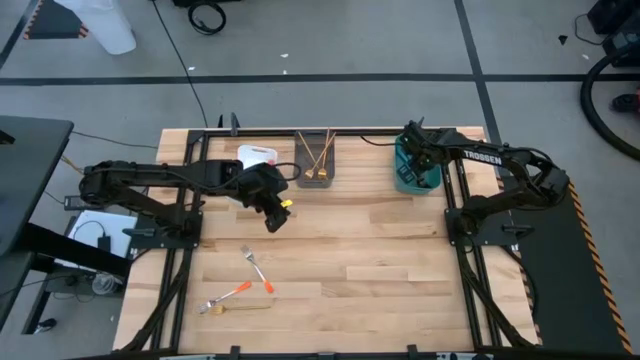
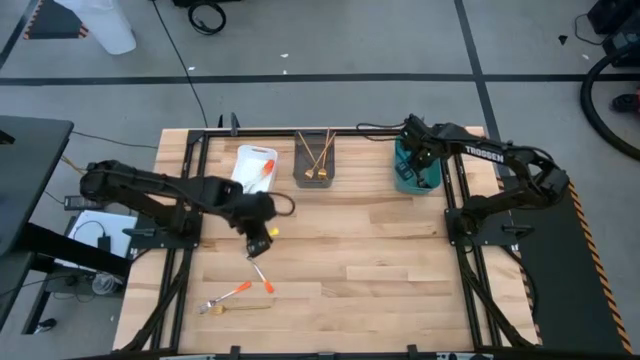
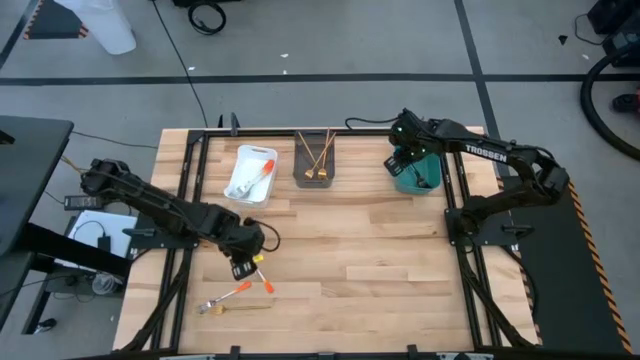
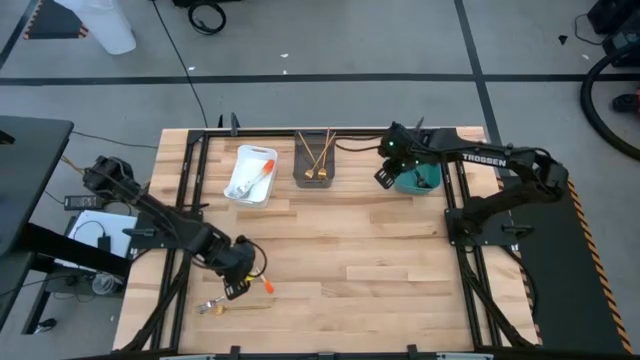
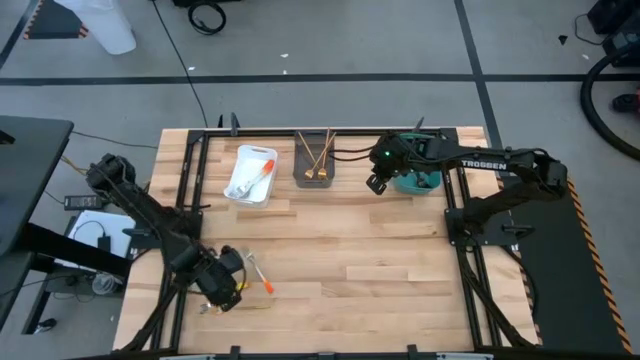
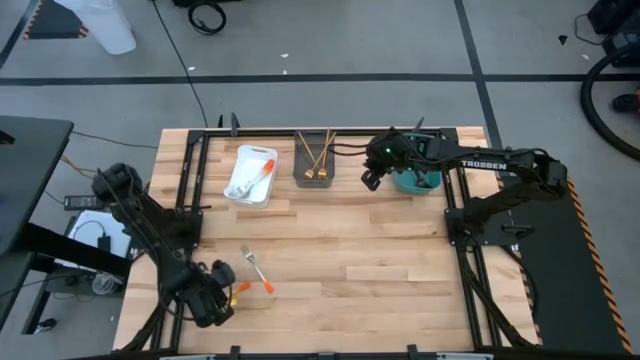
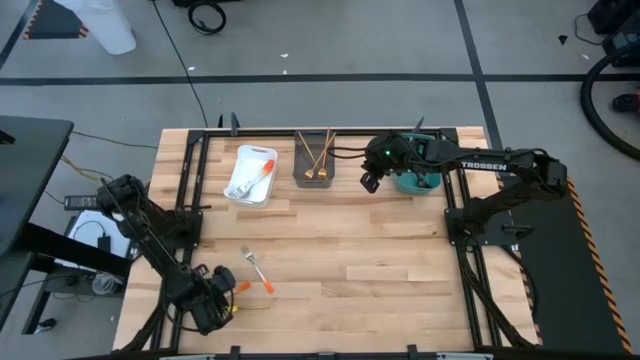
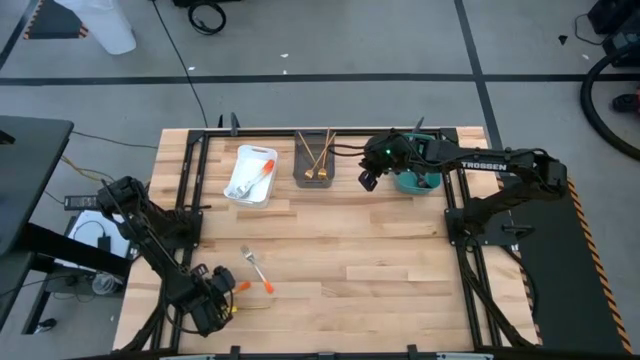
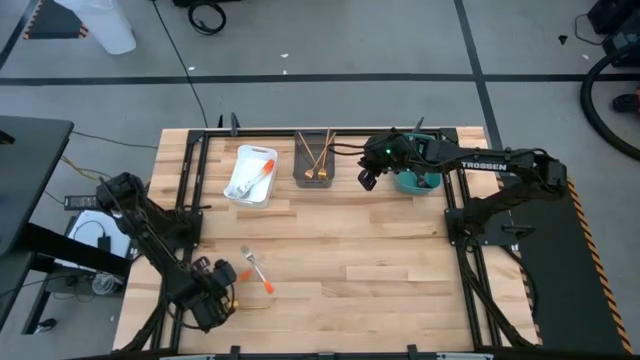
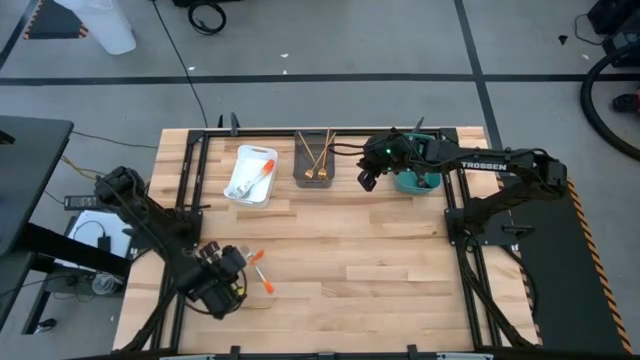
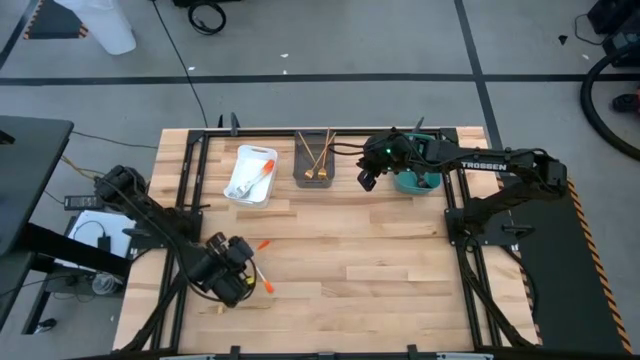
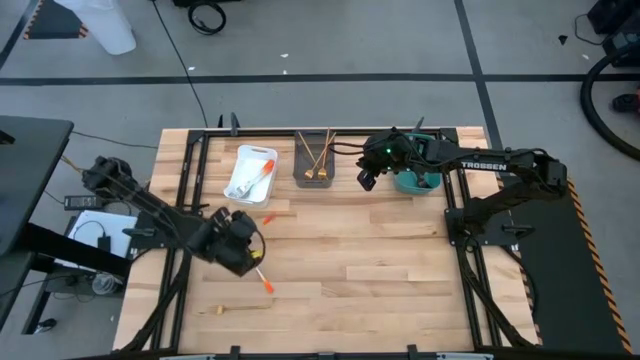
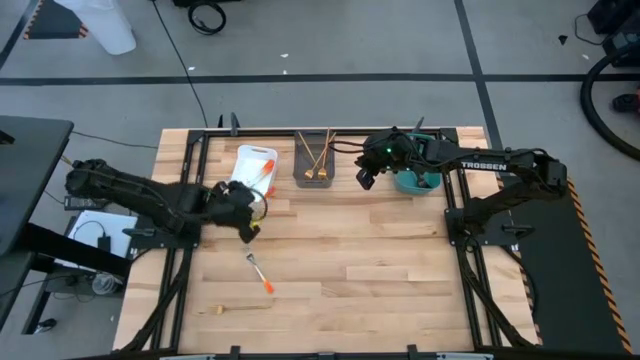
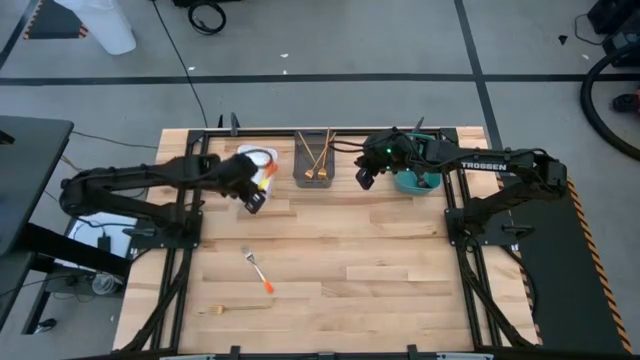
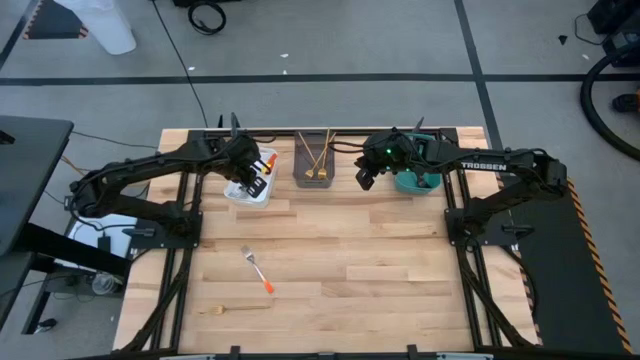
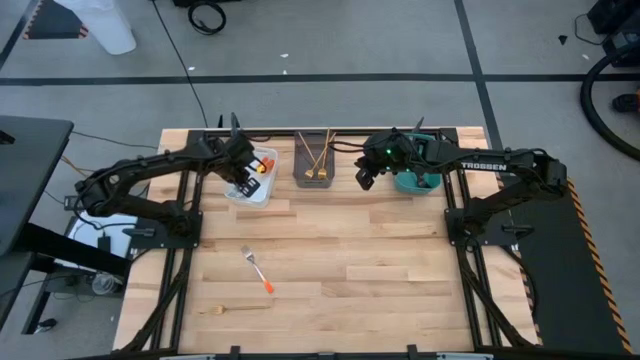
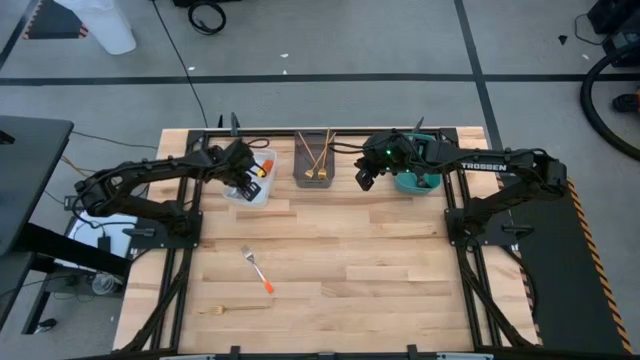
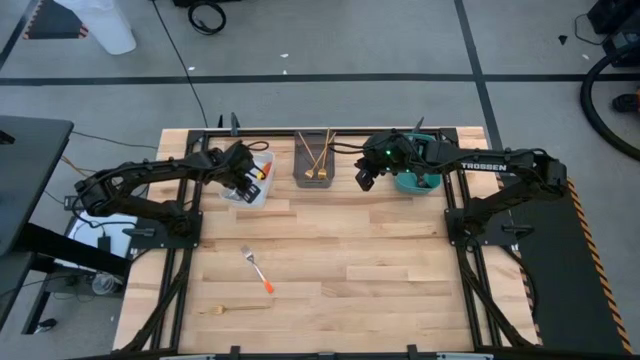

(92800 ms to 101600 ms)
Task: Sort silverware by color (type)
Put the orange fork into the white bin

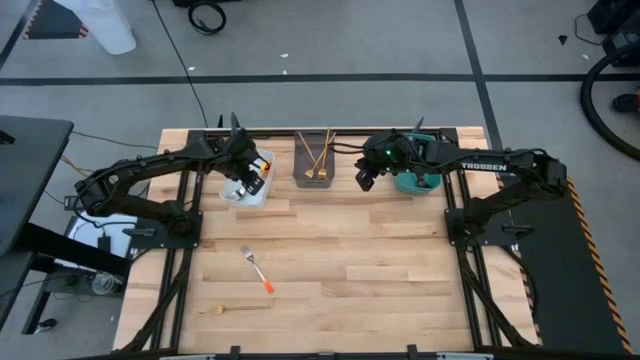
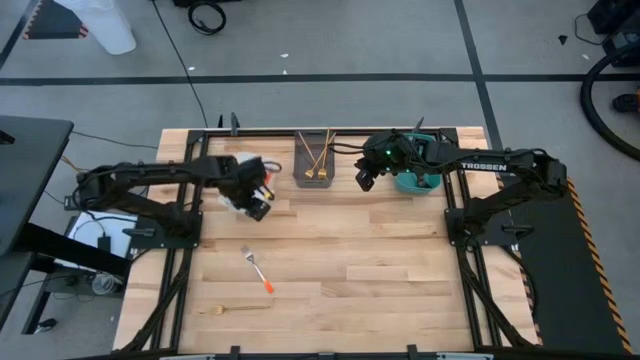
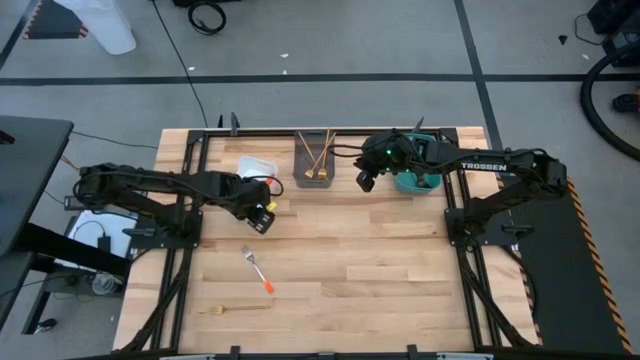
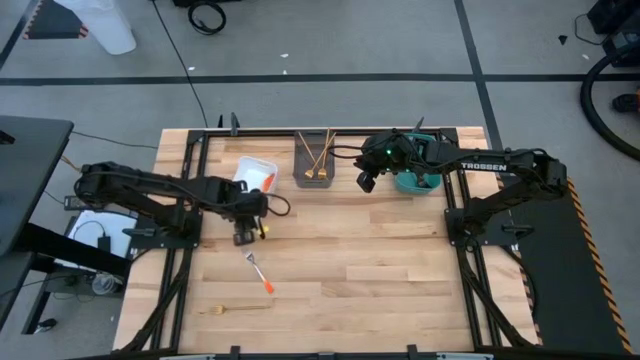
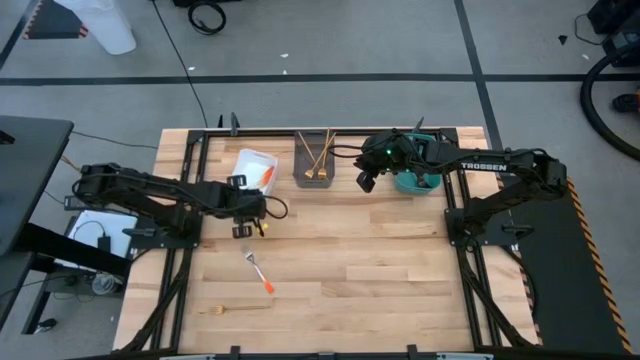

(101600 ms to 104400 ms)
Adjust the white bin

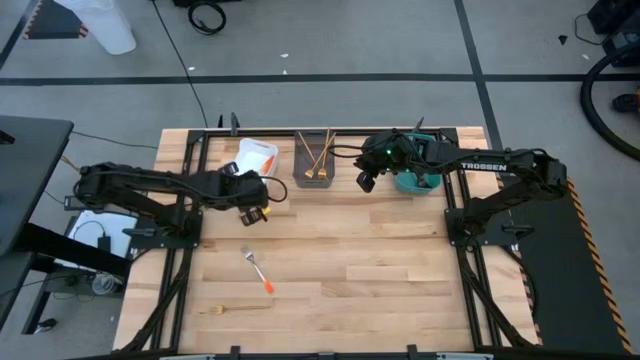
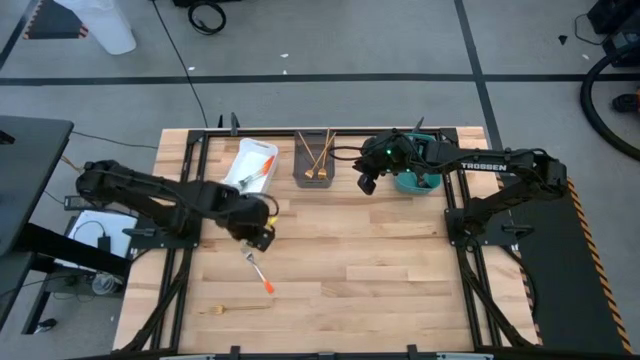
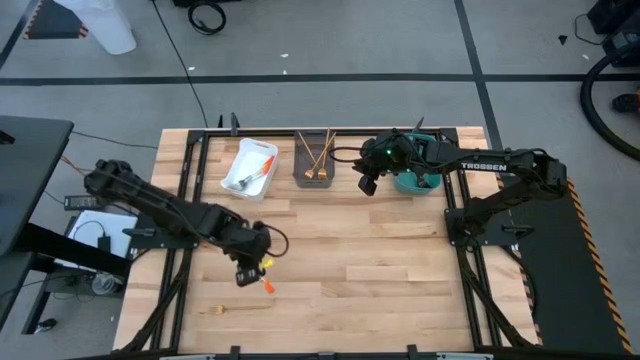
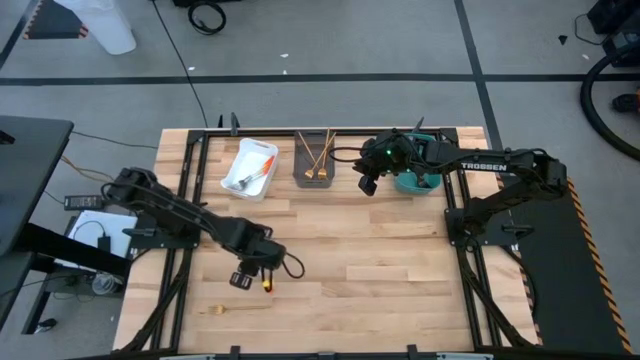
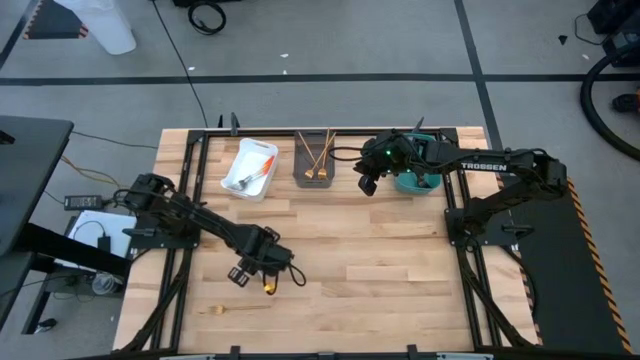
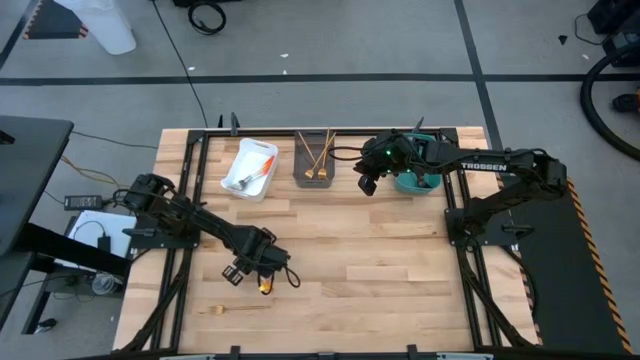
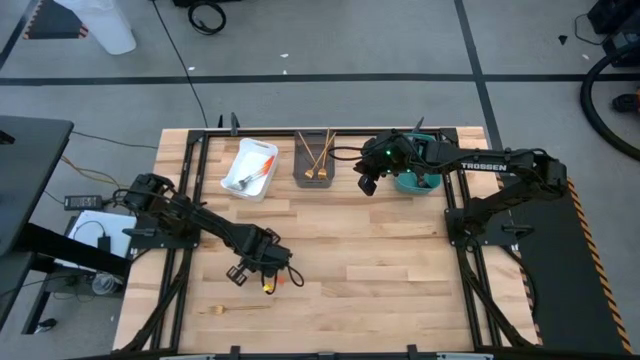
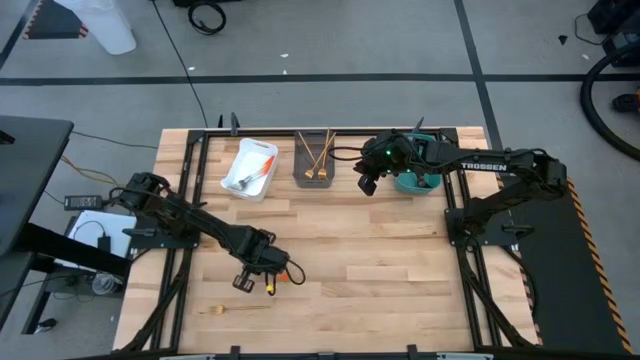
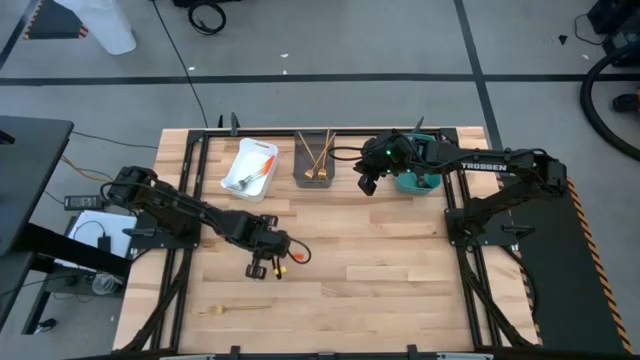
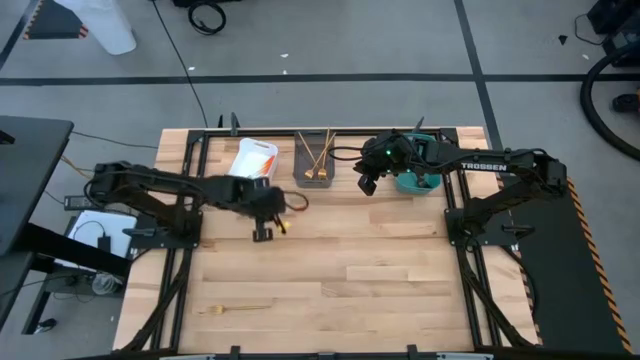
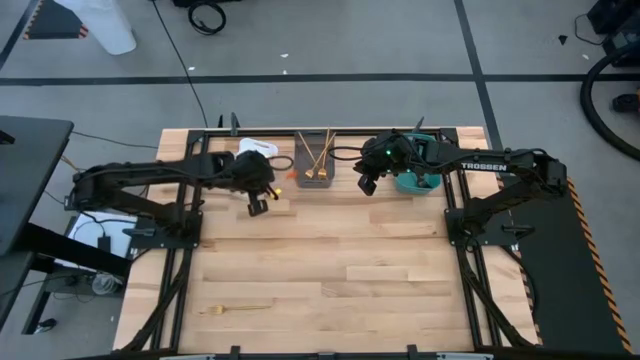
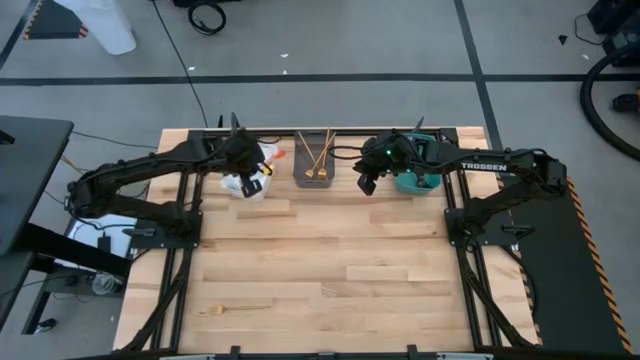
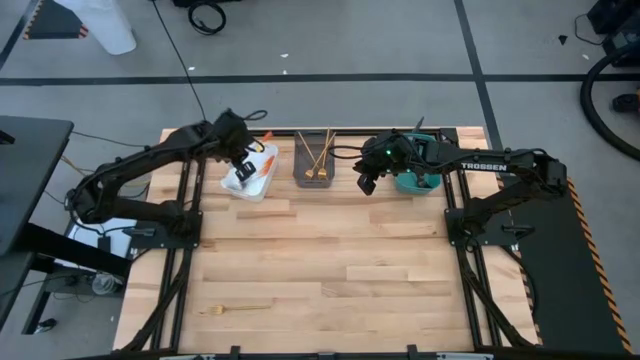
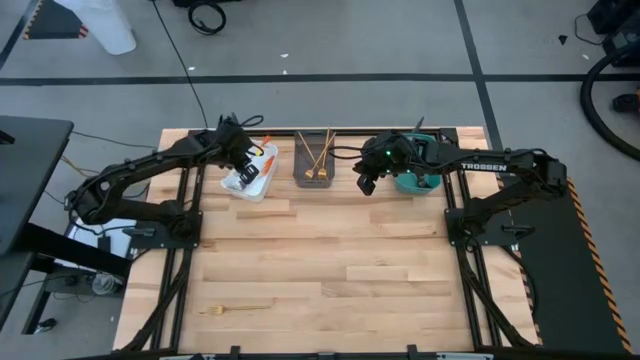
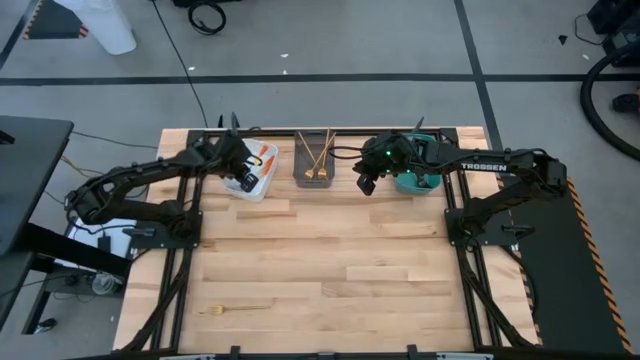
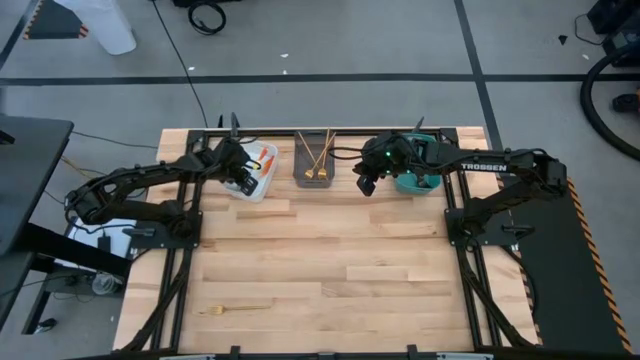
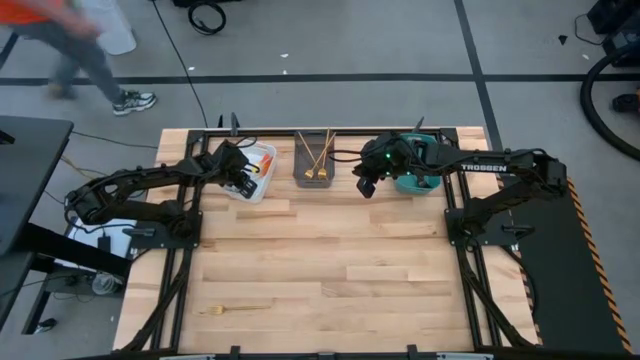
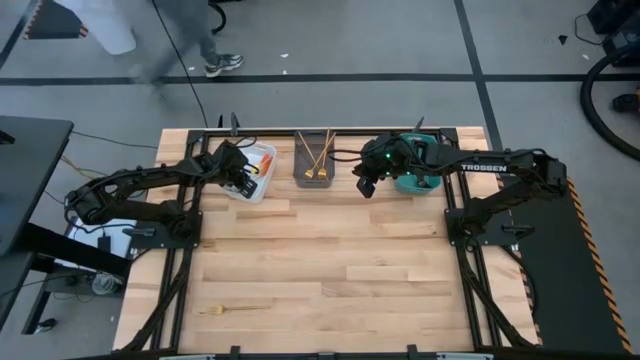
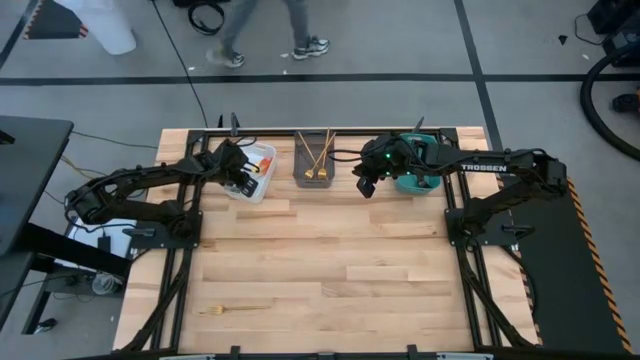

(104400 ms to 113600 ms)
Put the orange fork into the white bin
